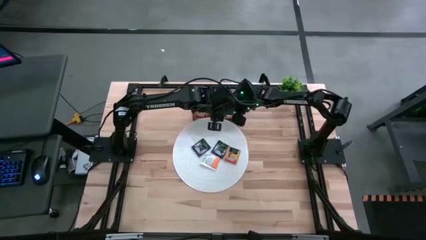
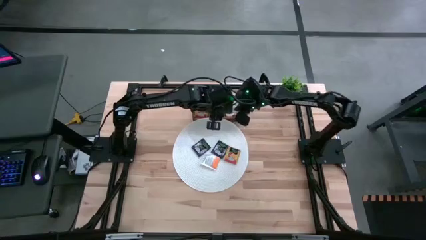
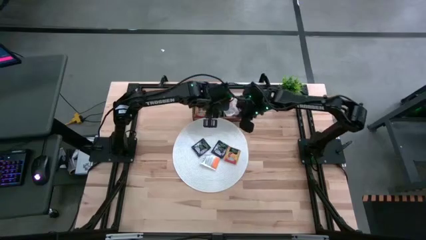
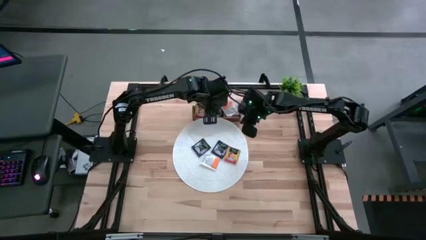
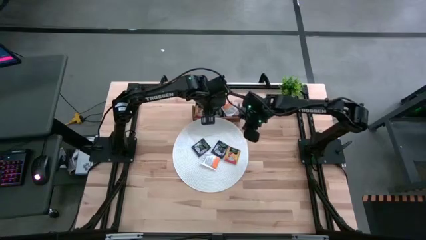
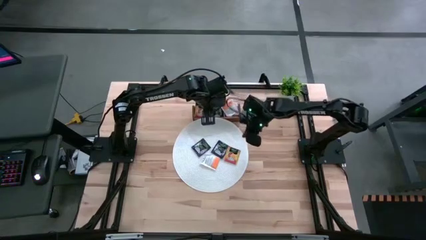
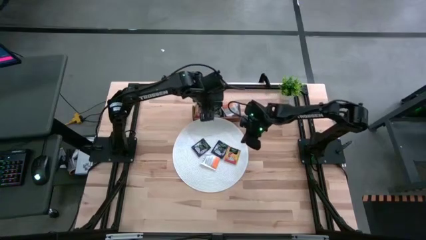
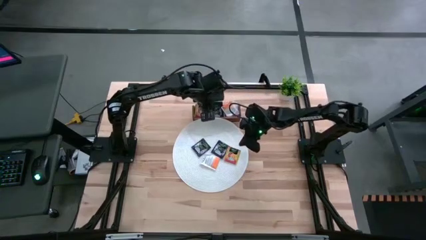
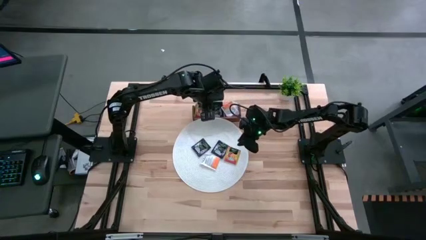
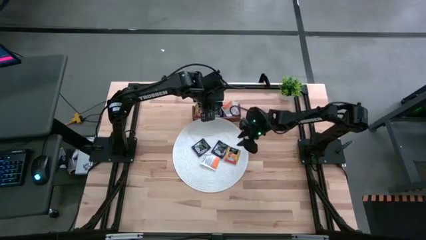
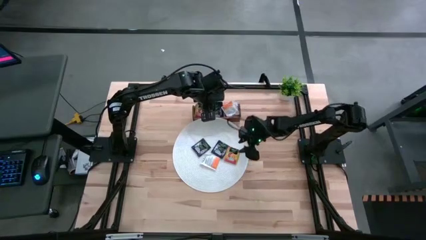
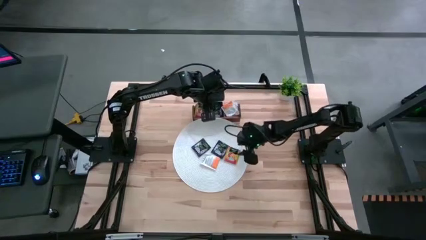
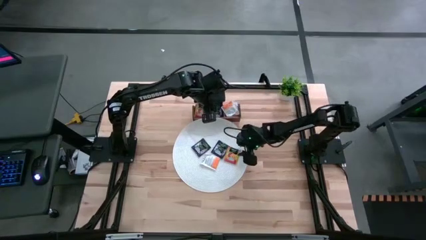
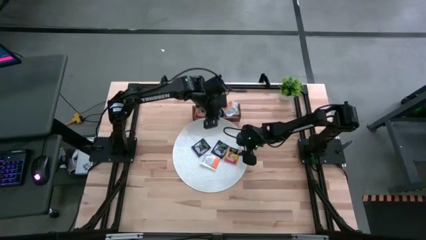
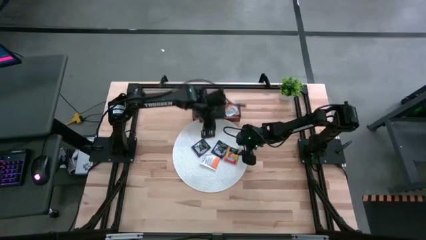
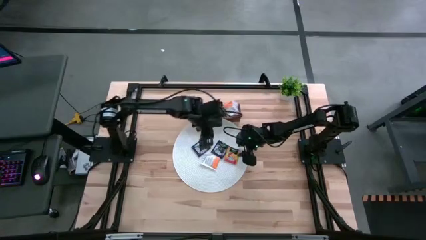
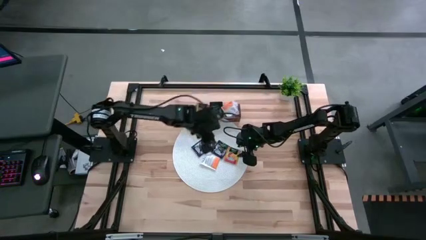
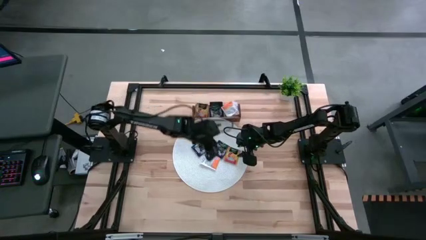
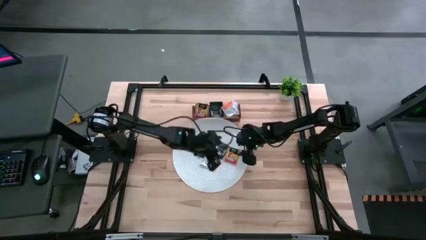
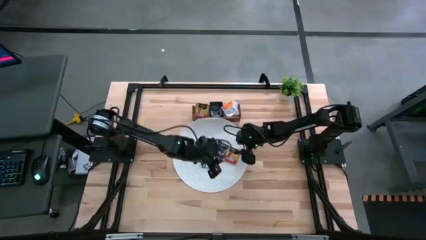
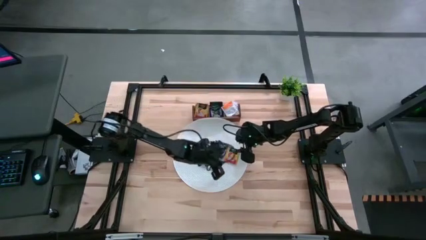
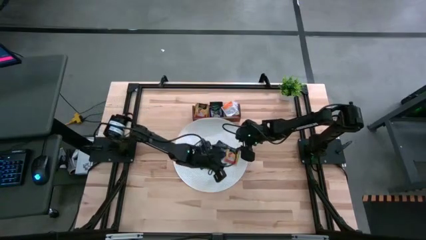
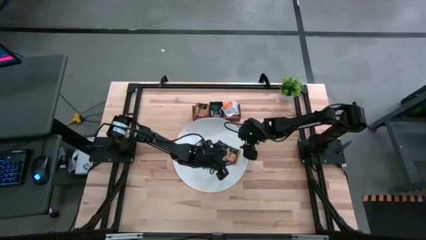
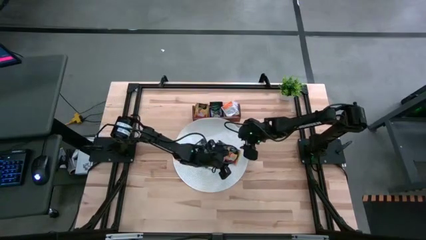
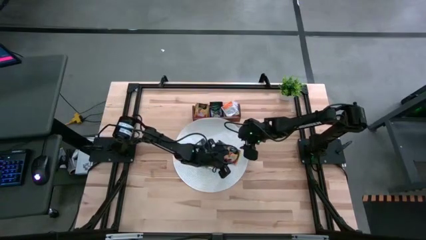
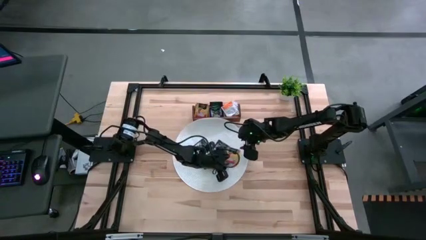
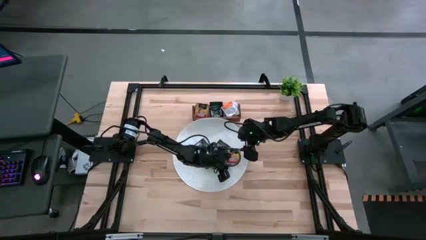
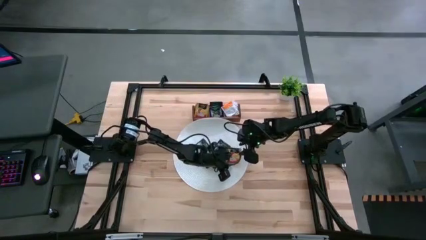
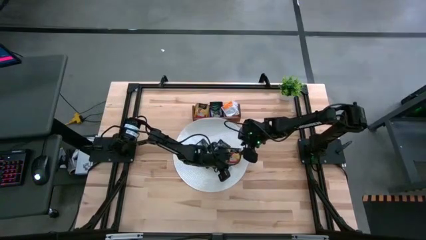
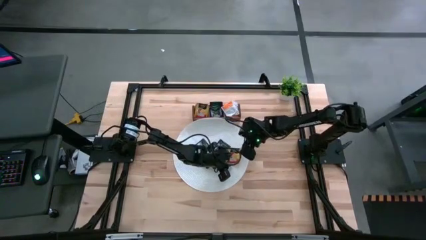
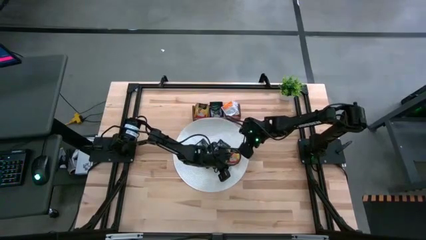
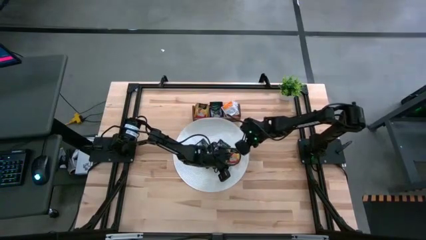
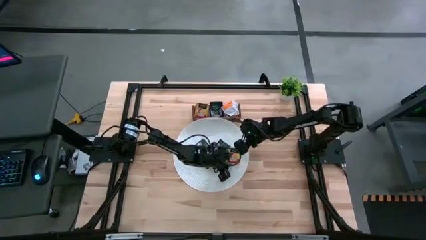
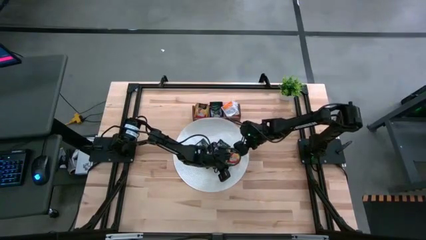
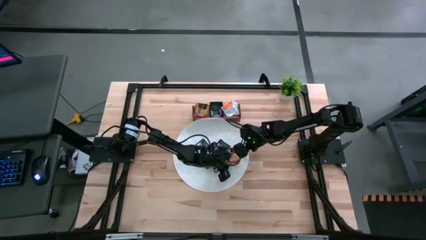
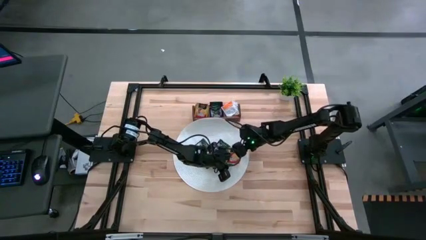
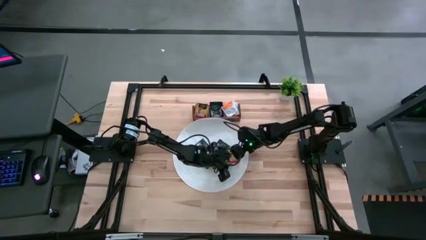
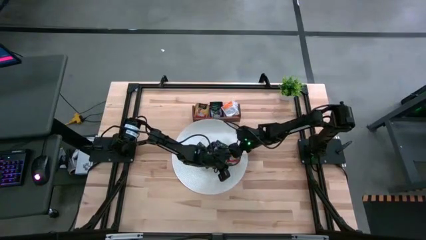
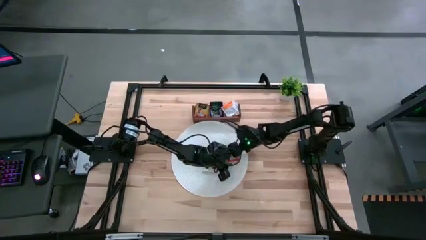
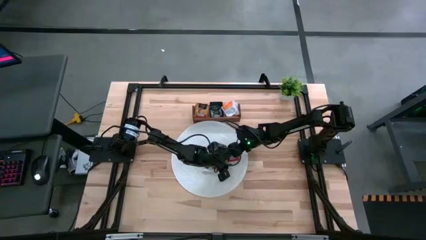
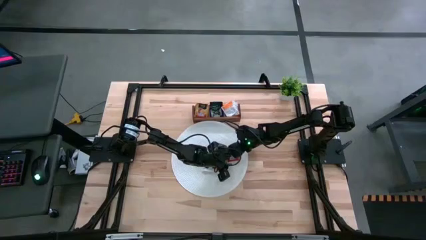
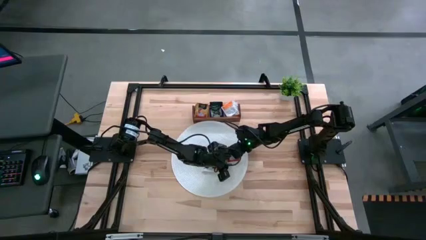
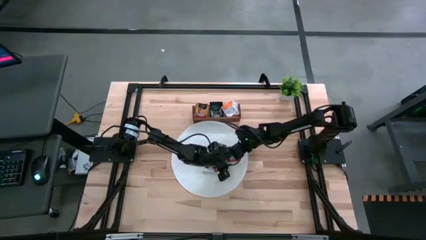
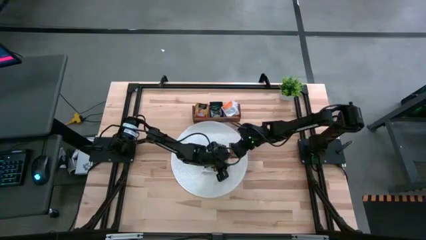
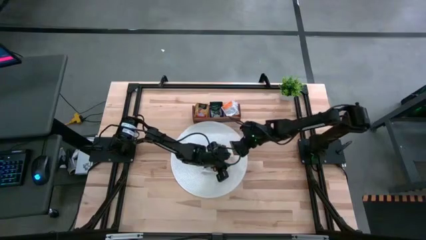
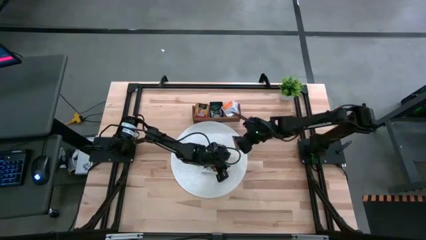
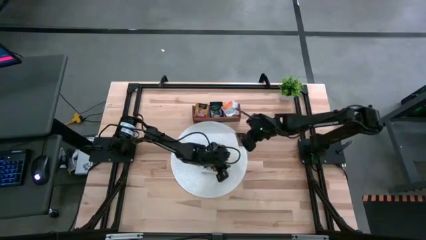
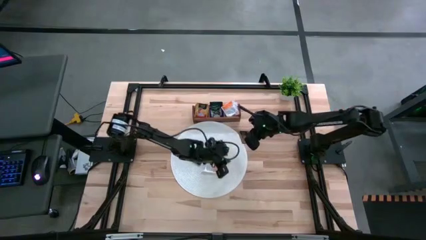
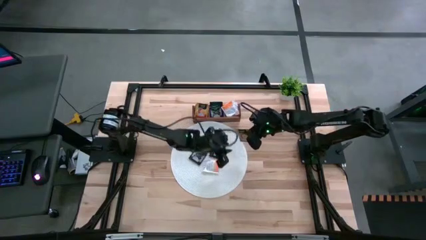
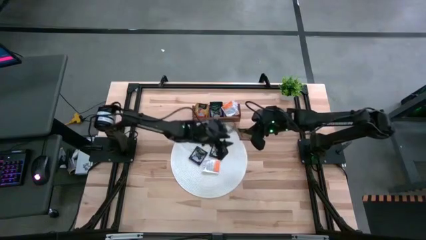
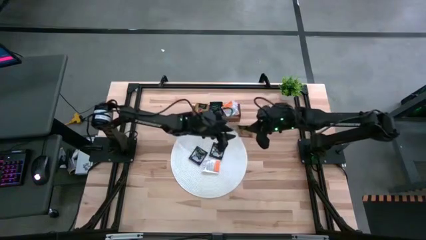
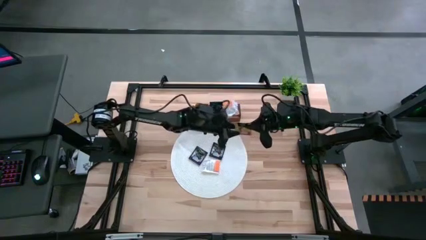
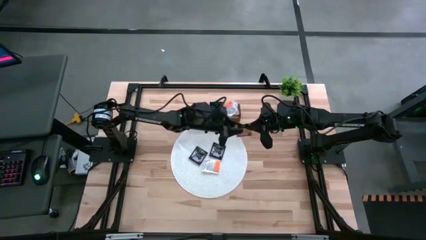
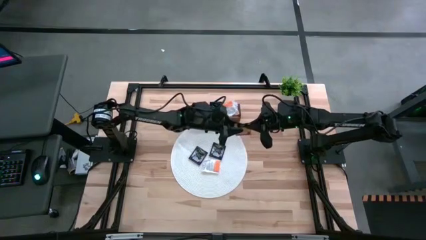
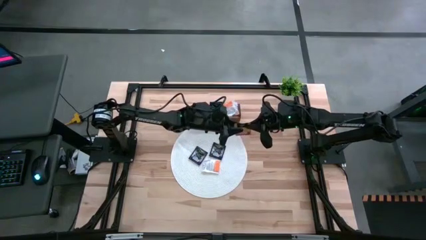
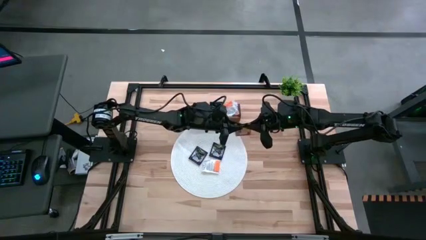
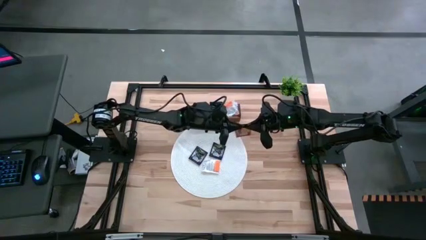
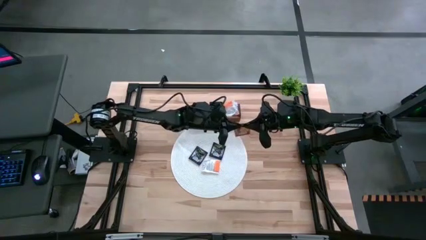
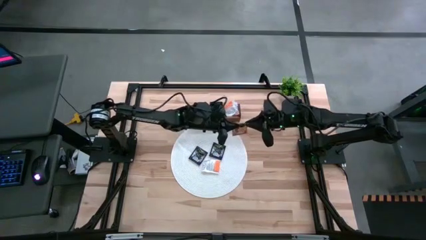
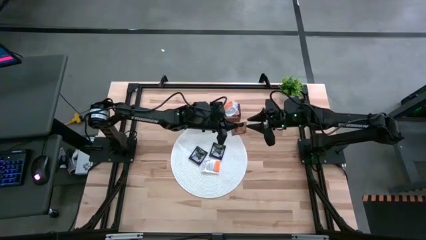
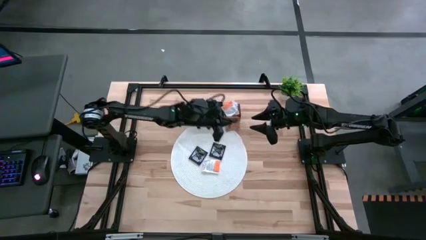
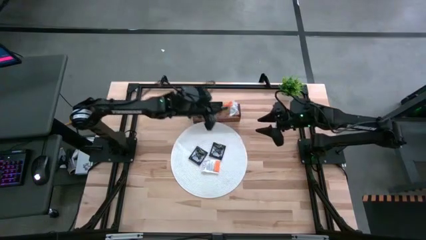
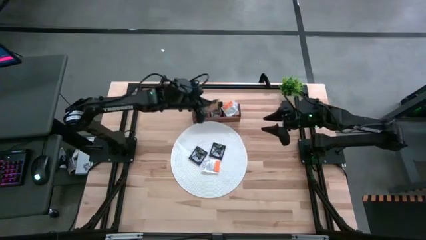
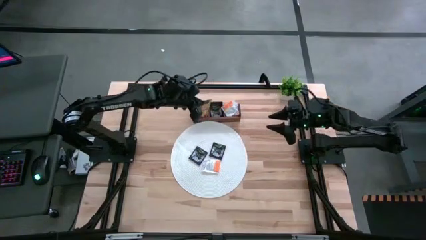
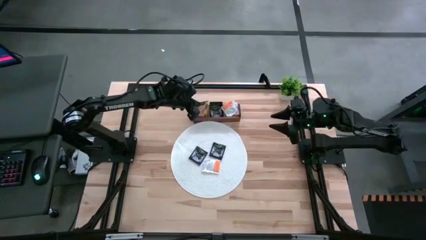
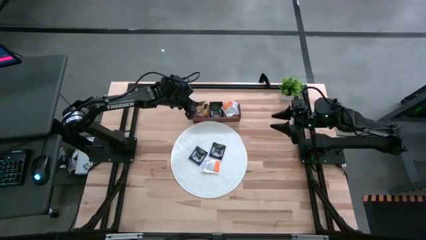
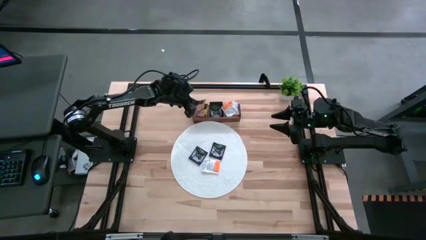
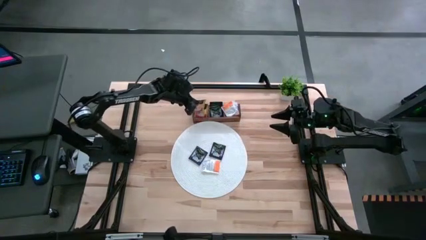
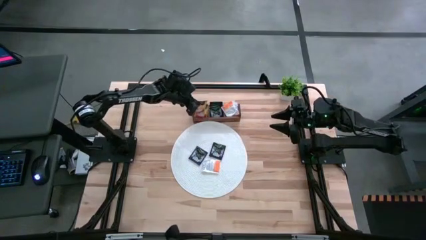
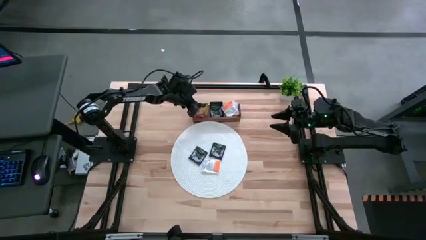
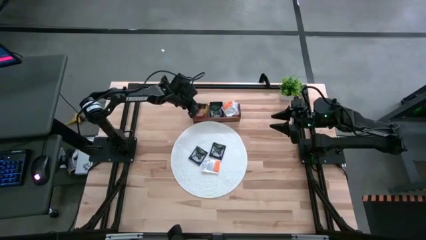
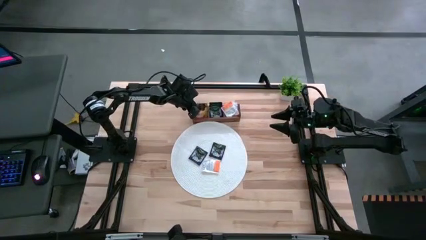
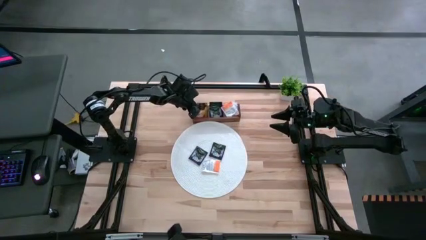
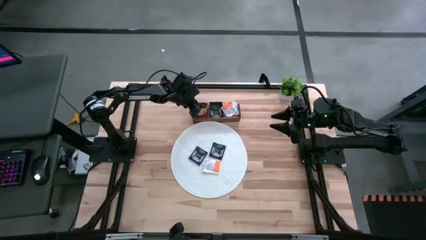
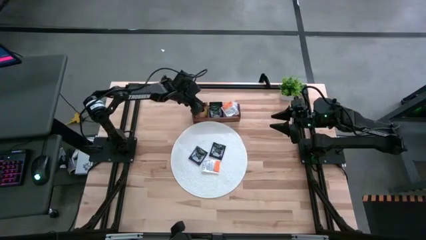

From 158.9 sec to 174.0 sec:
Task: Pick & Place Tea
Put the yellow tea bag into the left section of the wooden organizer
